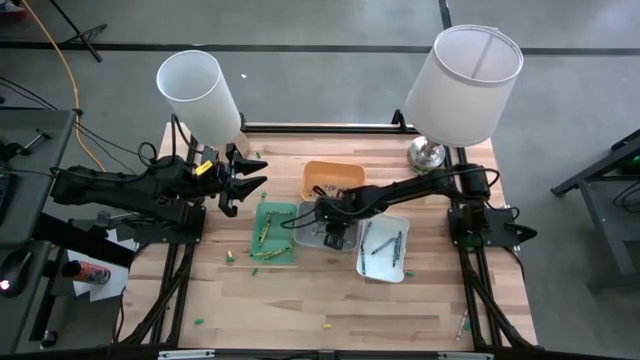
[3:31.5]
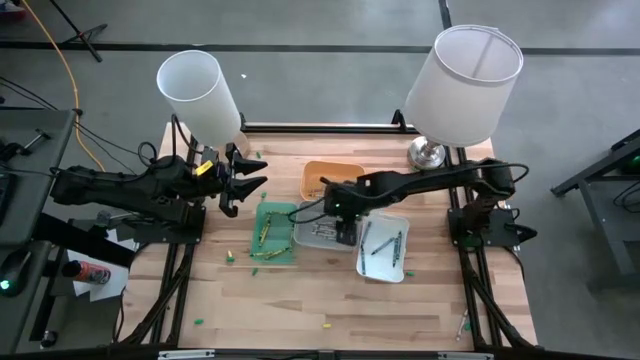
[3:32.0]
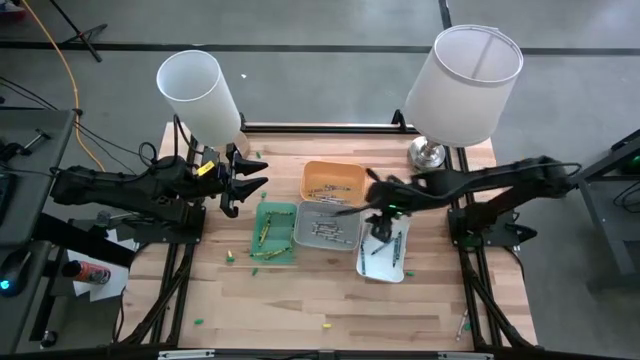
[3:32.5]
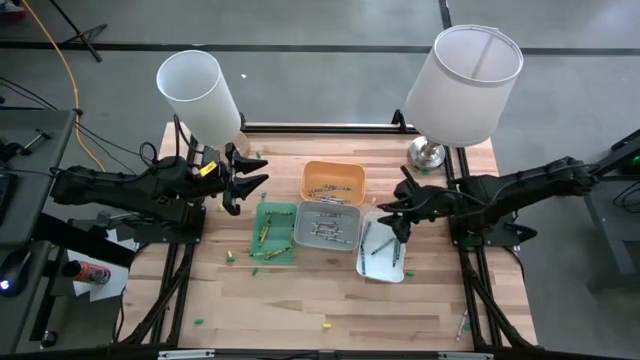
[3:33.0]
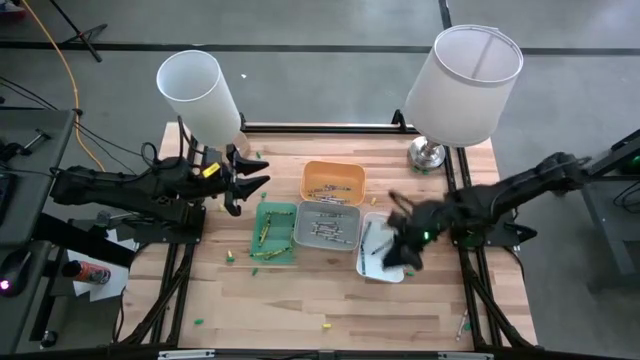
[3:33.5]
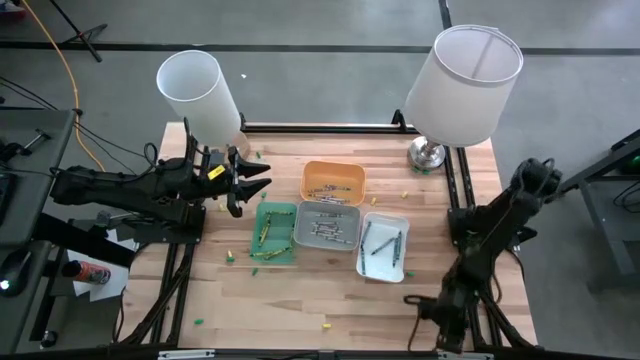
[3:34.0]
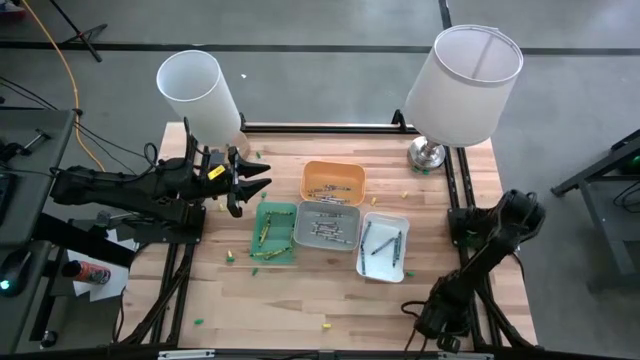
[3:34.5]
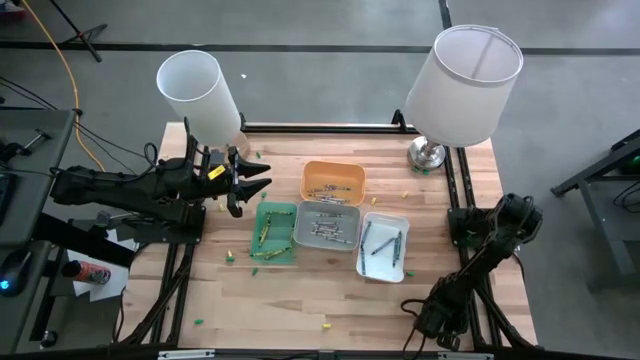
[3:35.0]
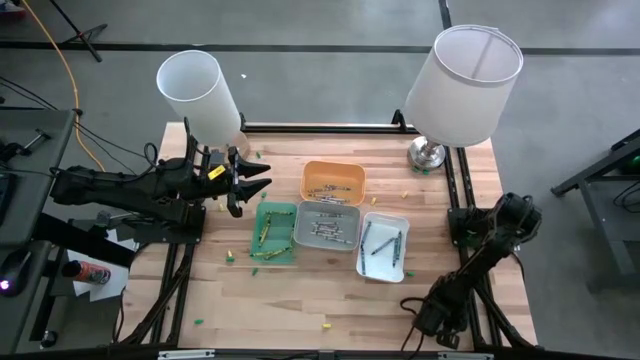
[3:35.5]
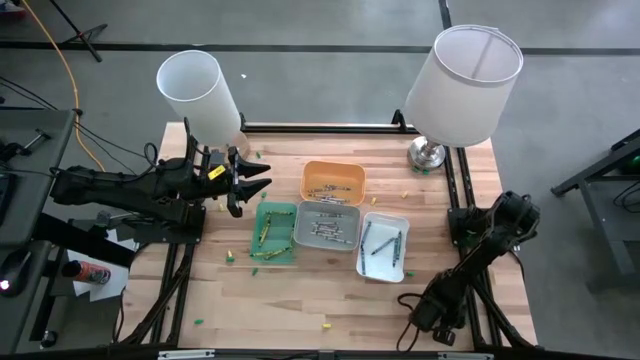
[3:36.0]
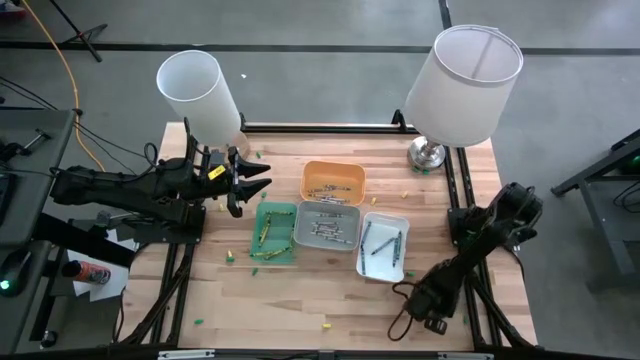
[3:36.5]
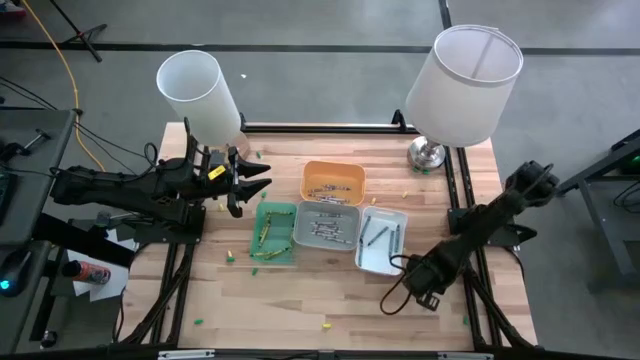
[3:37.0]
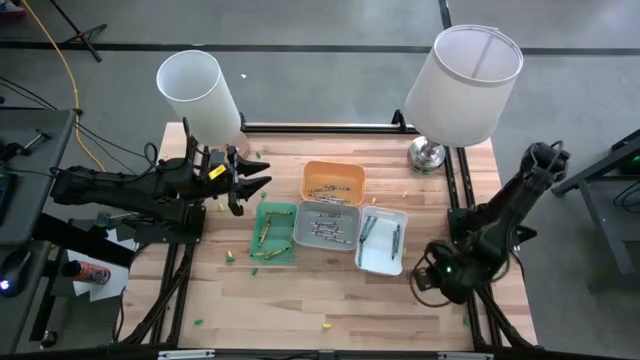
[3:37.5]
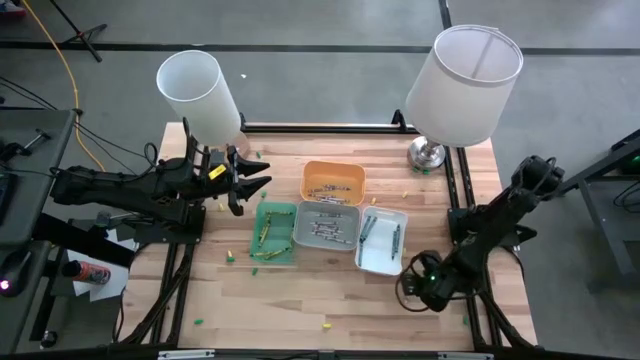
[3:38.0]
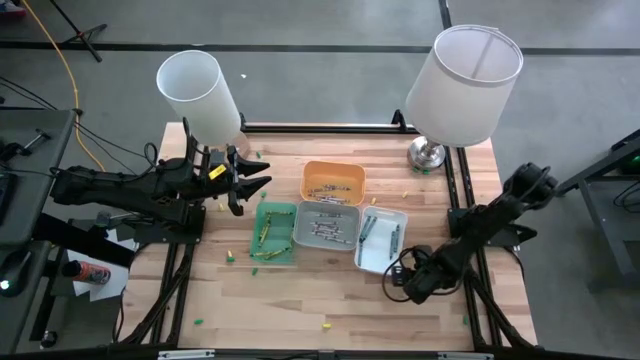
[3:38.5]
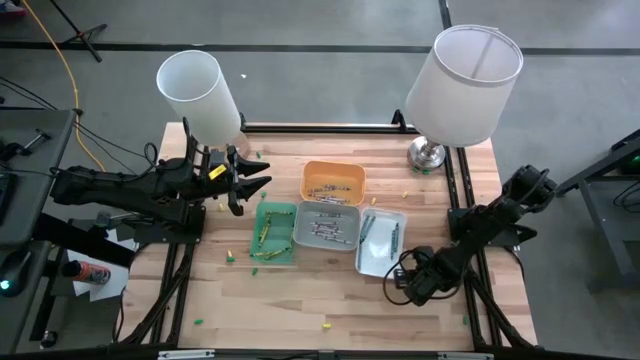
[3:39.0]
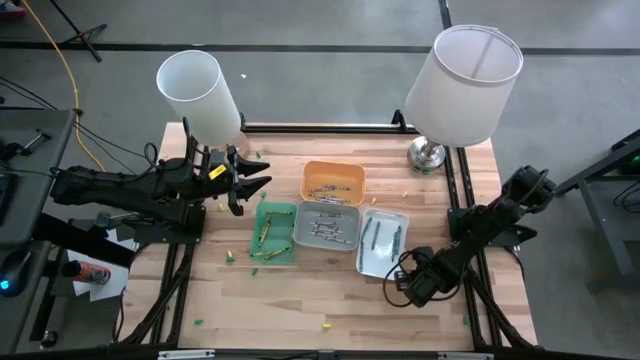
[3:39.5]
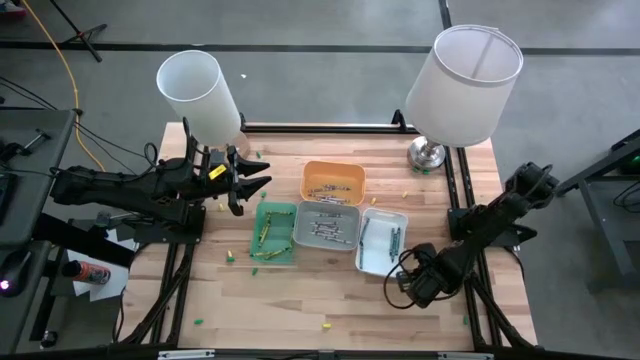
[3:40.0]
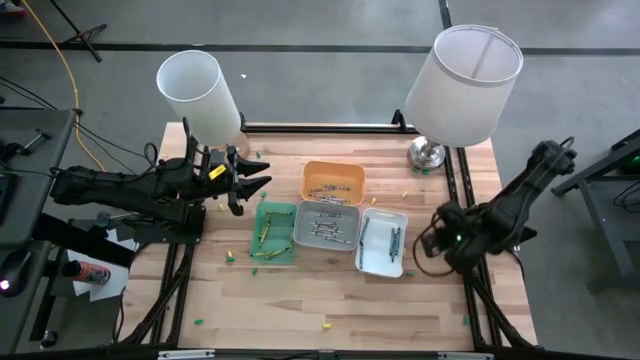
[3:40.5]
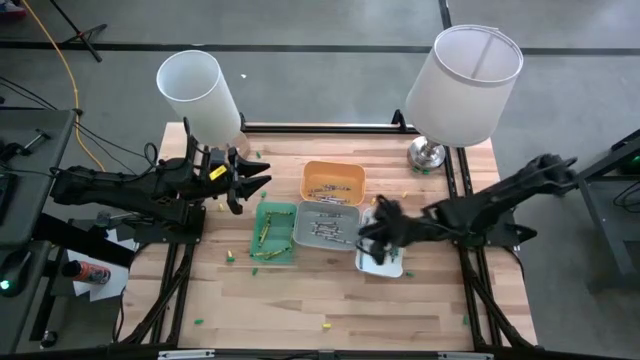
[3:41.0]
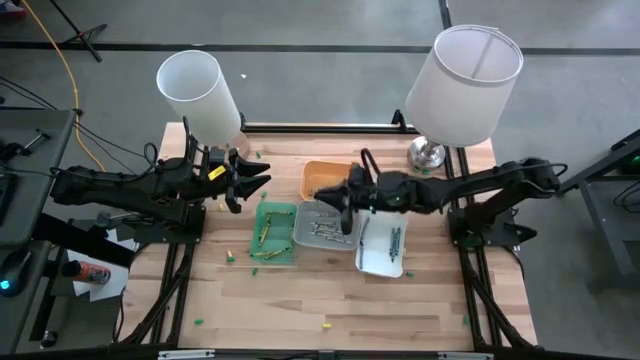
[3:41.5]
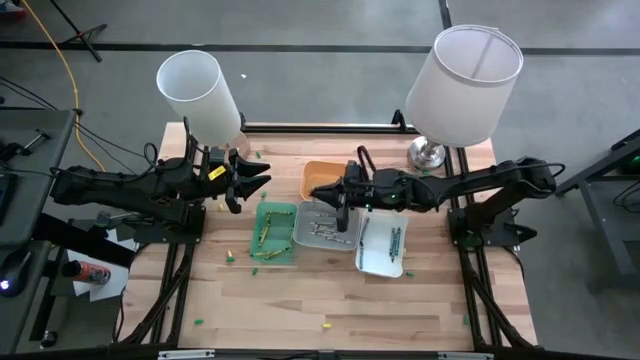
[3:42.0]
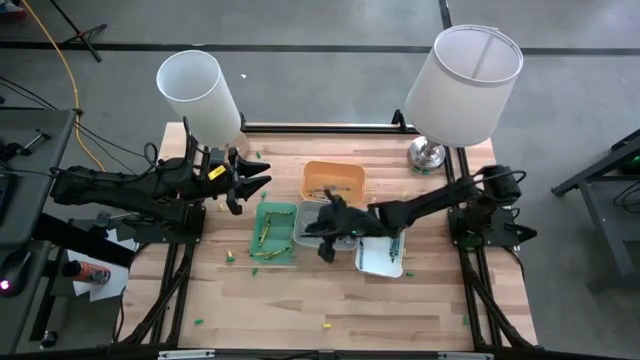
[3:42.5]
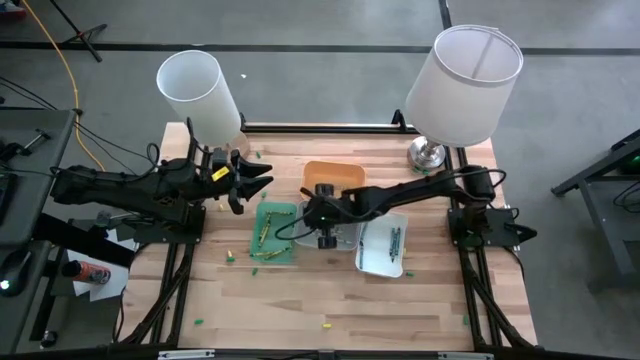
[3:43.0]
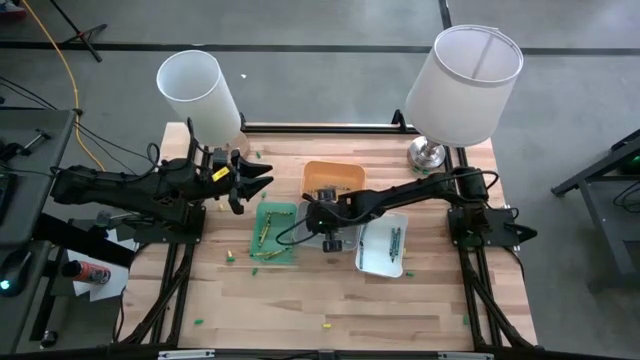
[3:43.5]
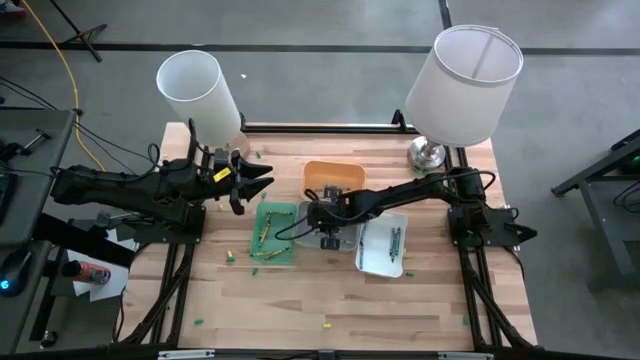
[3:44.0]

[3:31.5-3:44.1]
Task: Sort crayons
Put the white crayon into the gray bin

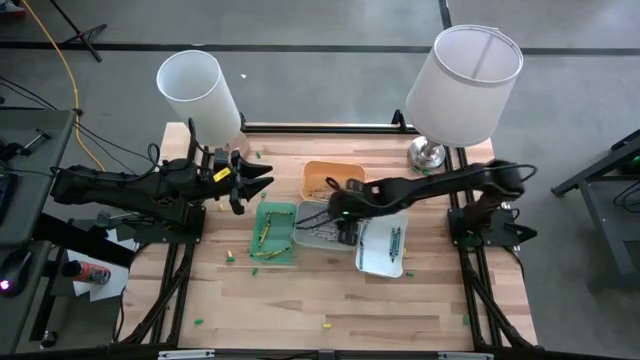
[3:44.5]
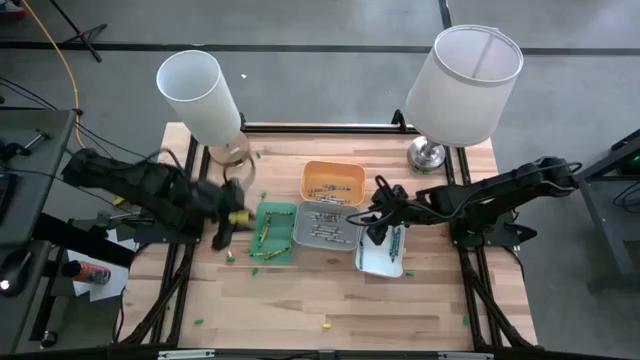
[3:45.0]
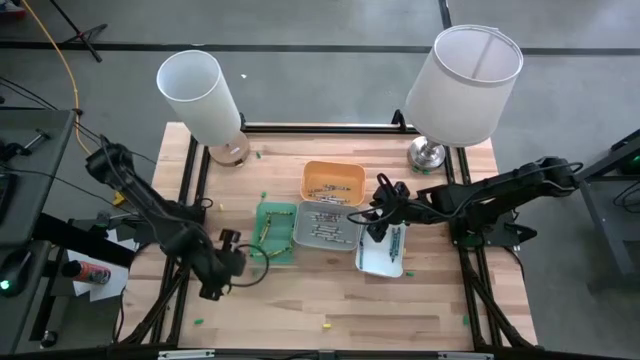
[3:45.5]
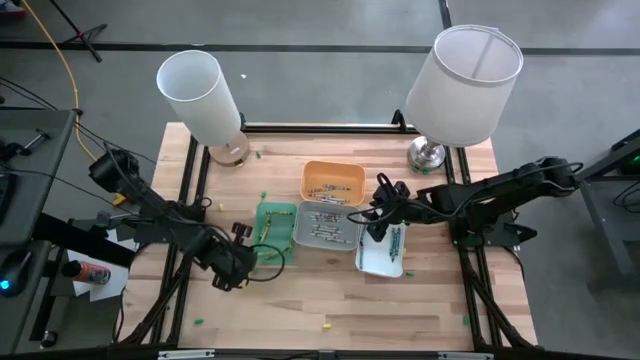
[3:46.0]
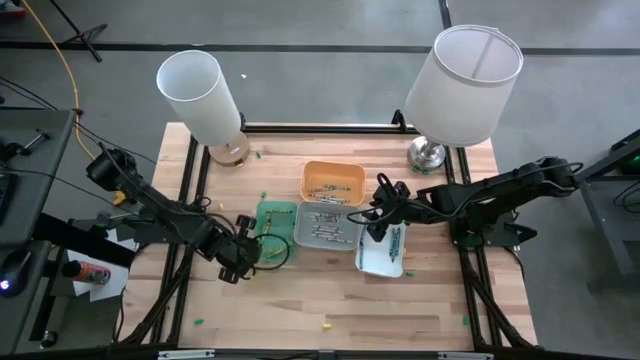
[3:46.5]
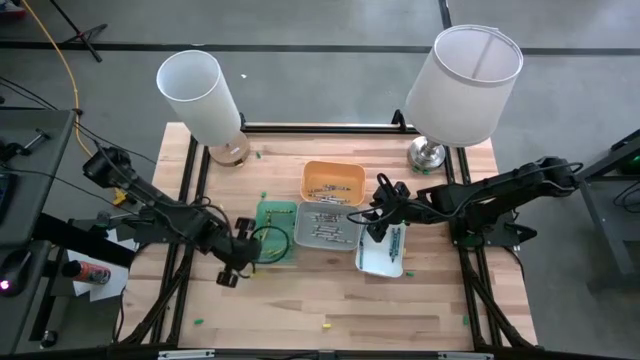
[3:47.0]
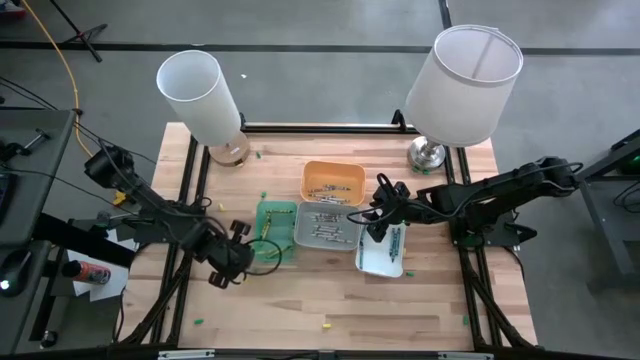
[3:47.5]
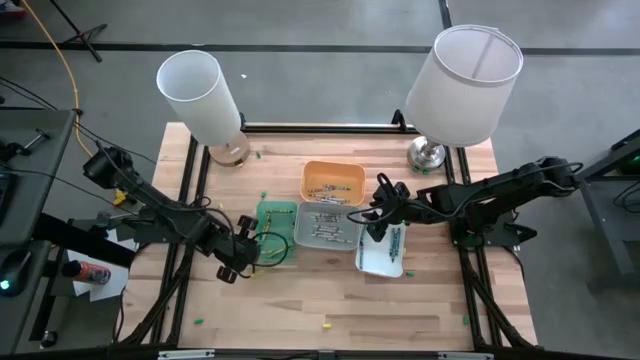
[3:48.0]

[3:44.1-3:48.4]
Adjust the green crayon in the green bin

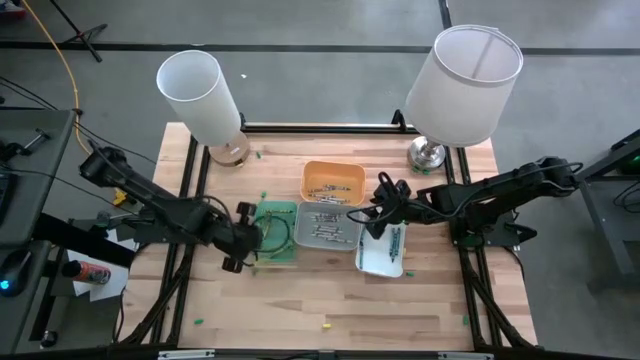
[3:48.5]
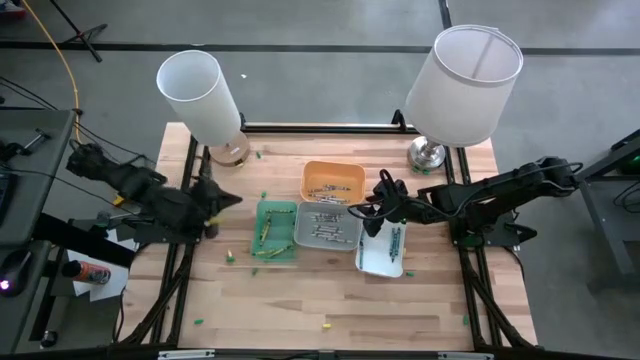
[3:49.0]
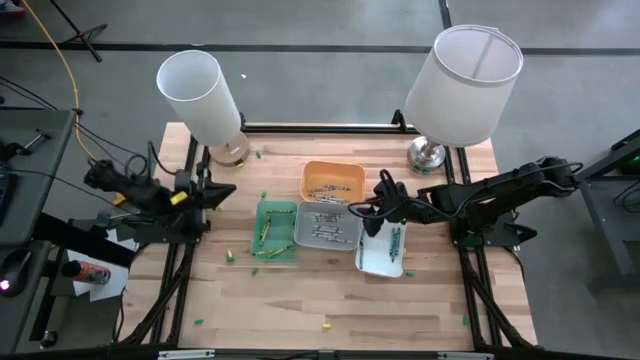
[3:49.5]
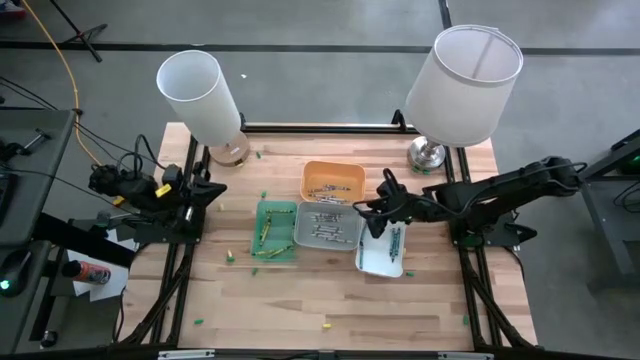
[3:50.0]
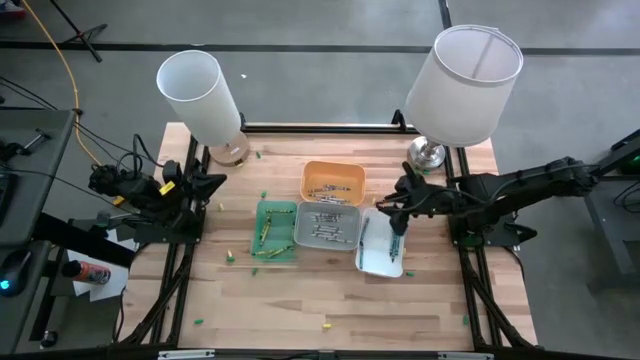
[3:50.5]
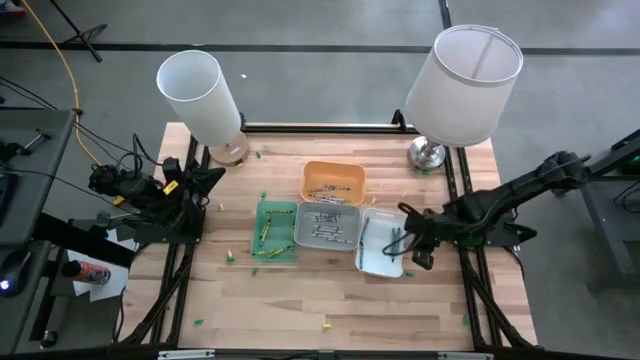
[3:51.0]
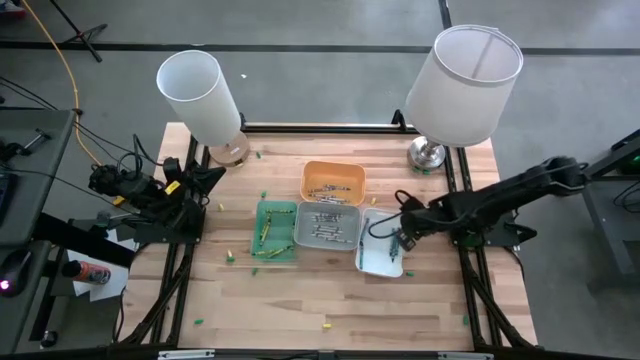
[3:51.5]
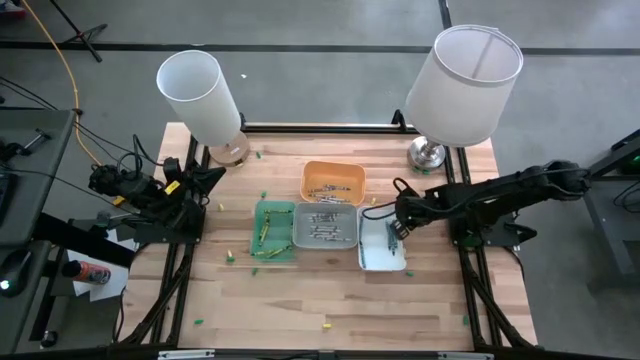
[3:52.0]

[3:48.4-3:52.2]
Adjust the white bin
